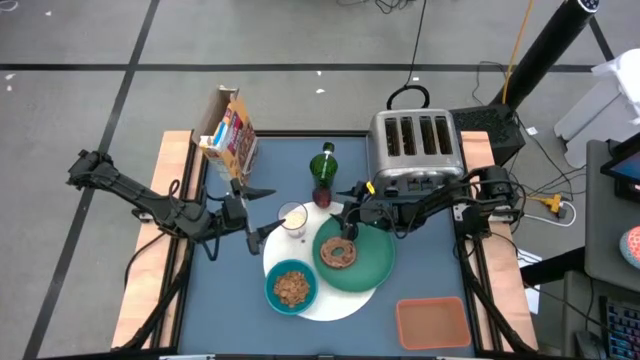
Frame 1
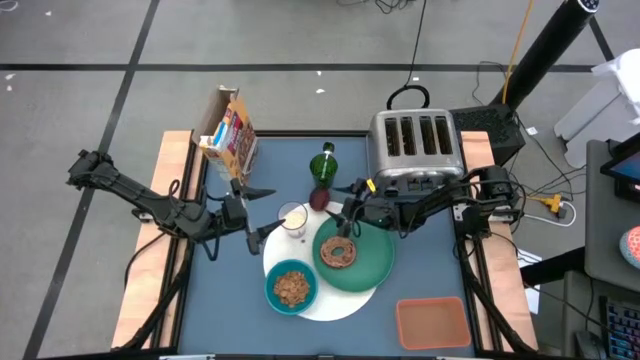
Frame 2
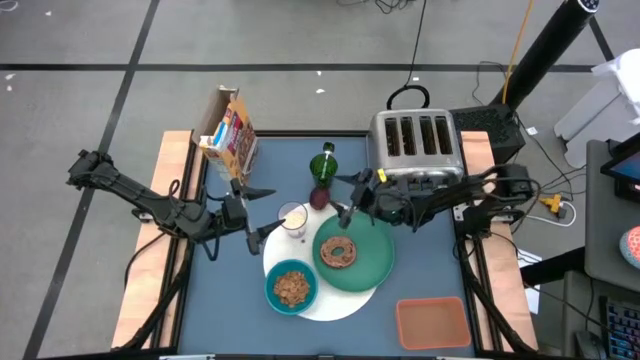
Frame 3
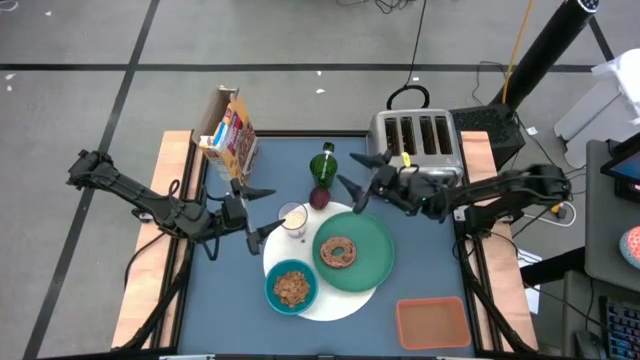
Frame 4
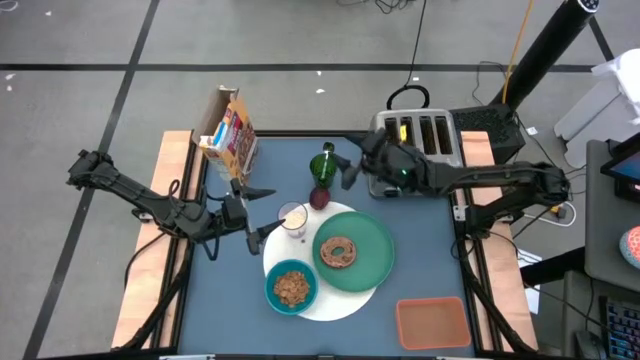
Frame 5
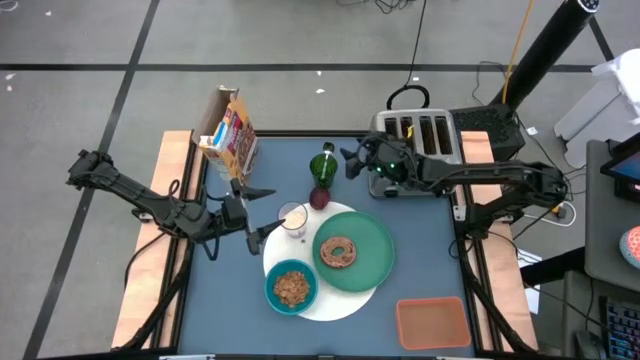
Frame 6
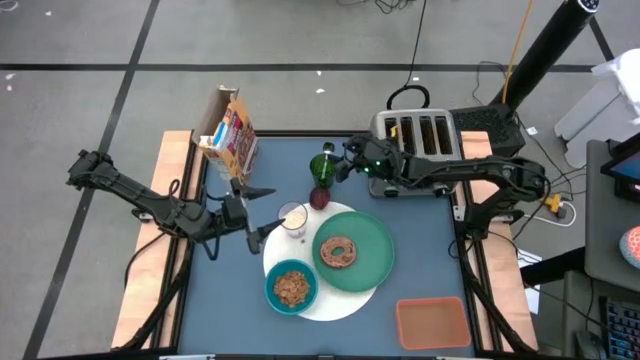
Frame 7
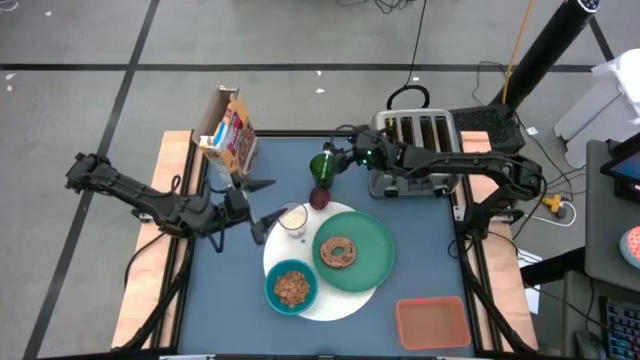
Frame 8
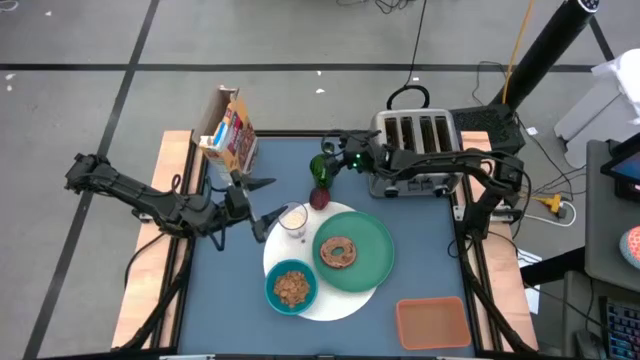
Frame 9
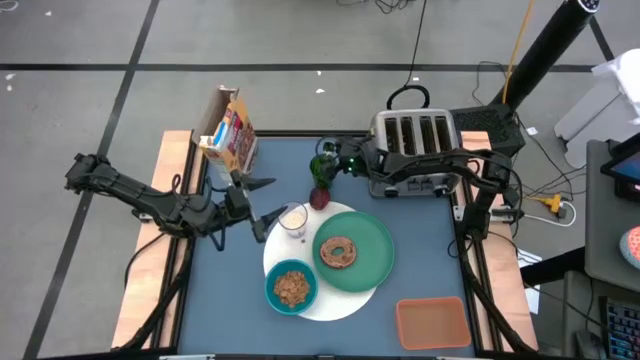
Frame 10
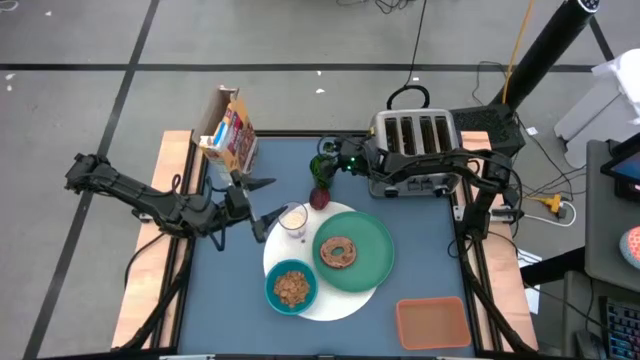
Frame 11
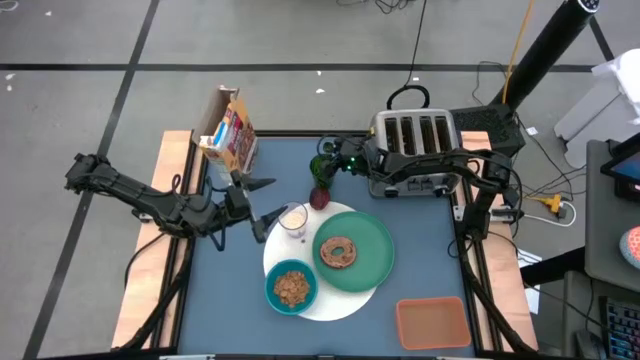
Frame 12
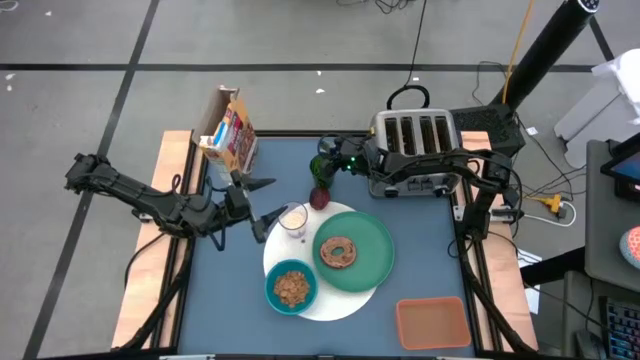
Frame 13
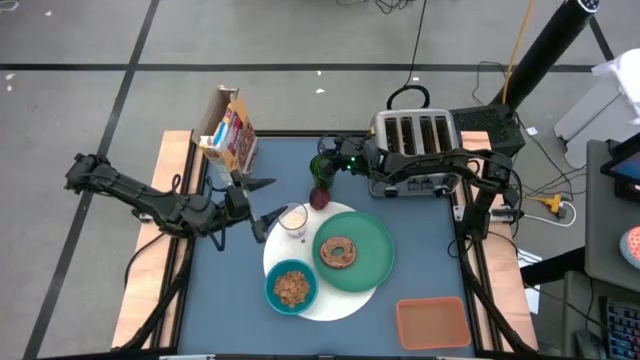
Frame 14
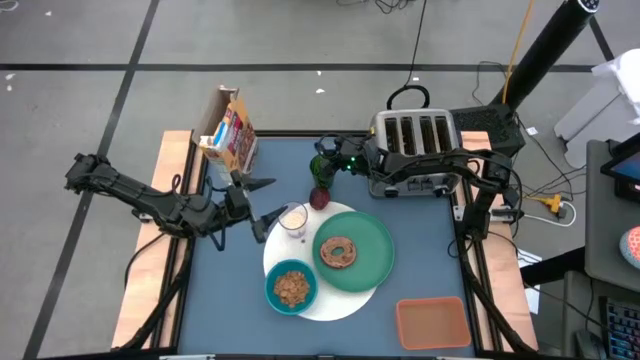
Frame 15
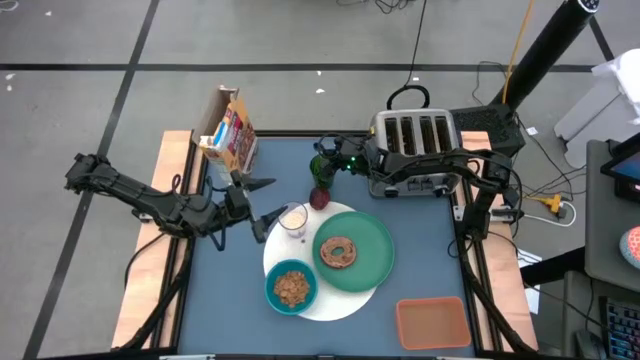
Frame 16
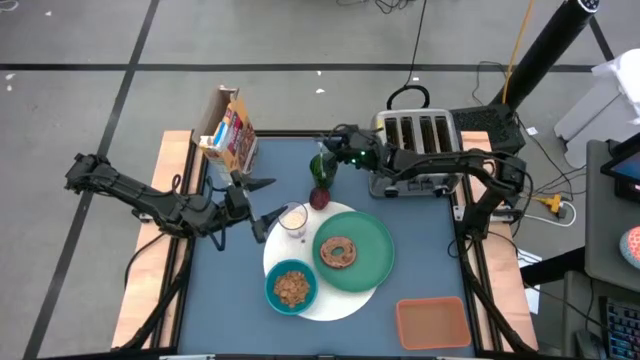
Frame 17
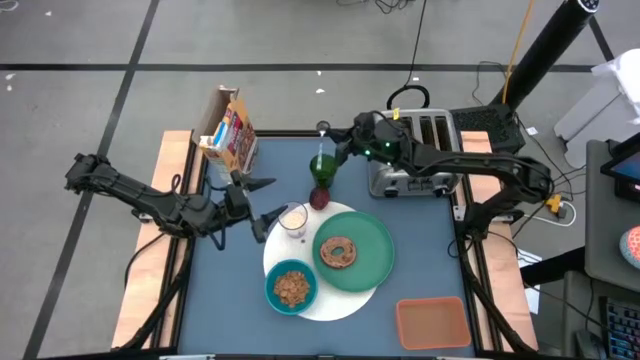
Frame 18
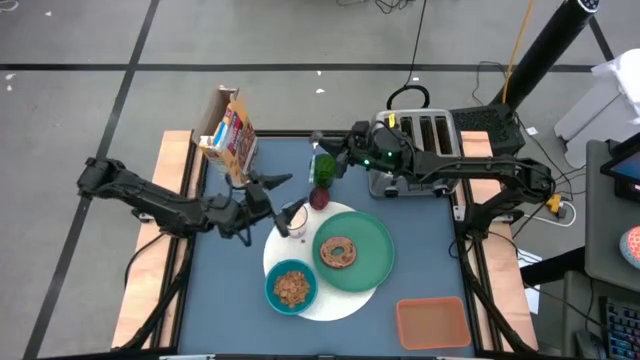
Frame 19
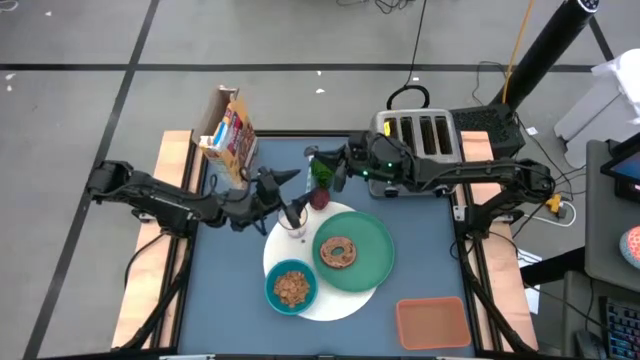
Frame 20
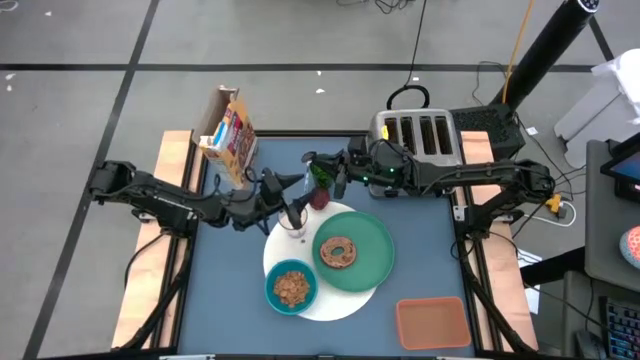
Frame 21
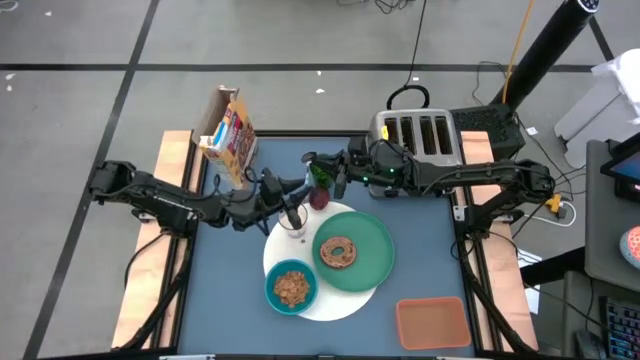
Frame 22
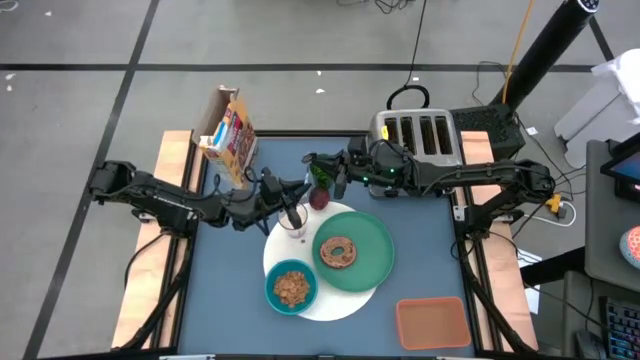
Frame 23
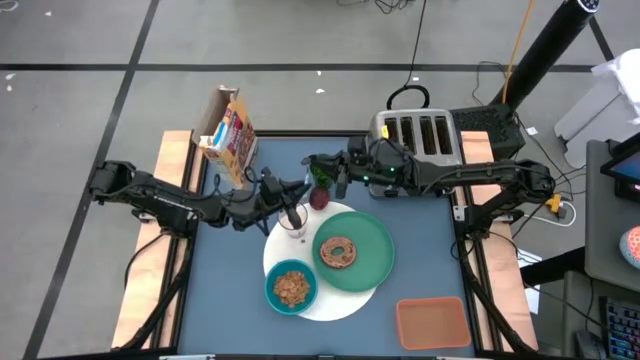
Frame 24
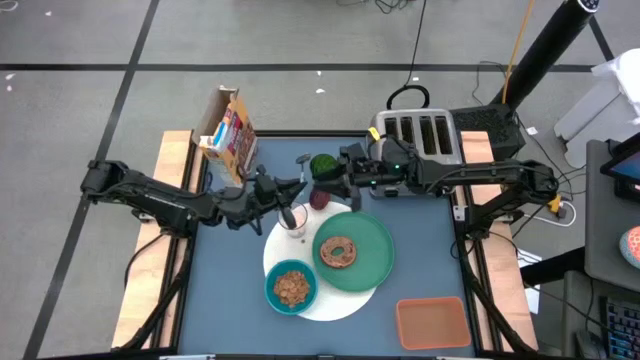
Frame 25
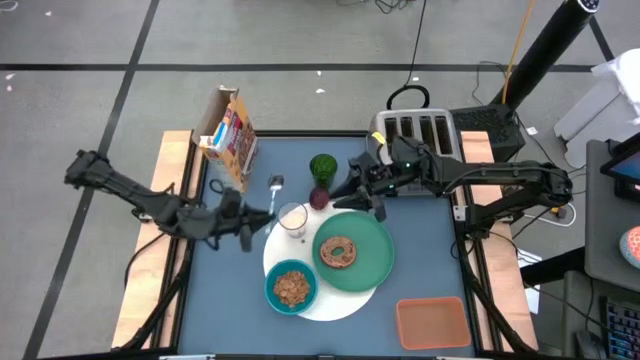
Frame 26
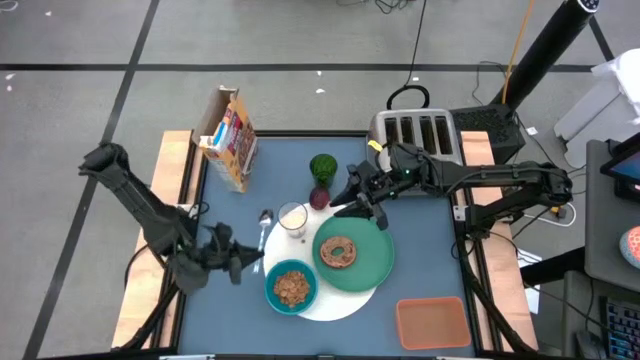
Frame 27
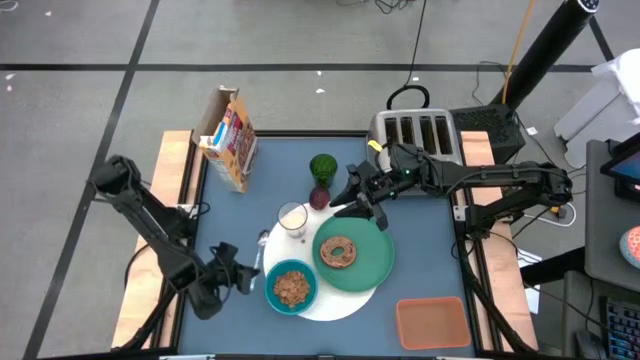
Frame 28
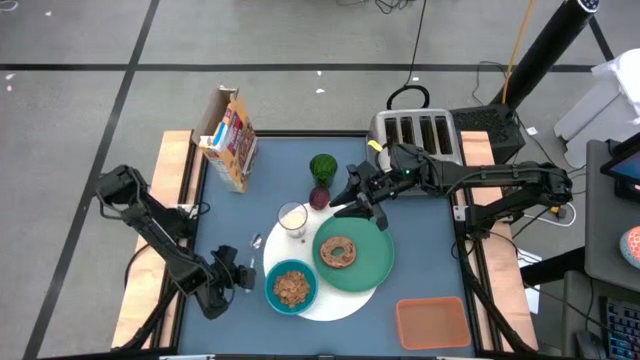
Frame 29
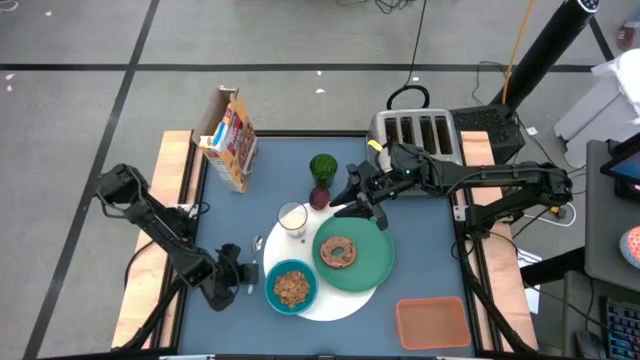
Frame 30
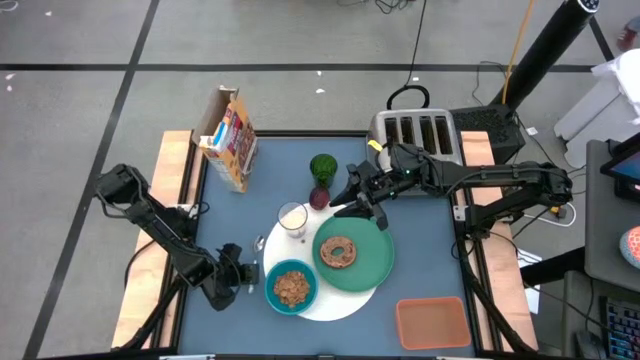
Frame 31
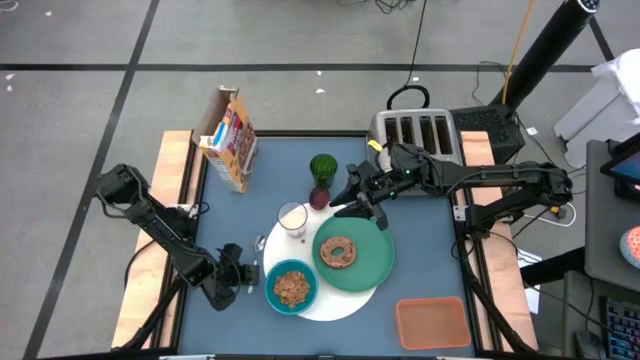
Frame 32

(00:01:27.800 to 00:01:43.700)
Task: Arrange a breakfast setting
Put the blue patterned spoon from the green cup on the table to the left of the white tablemat

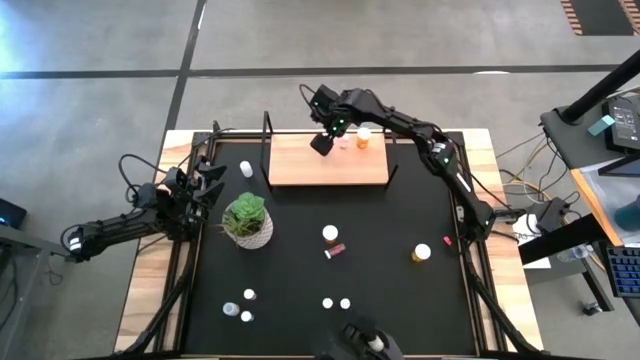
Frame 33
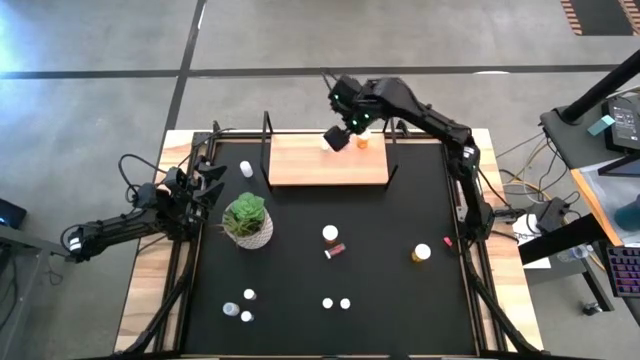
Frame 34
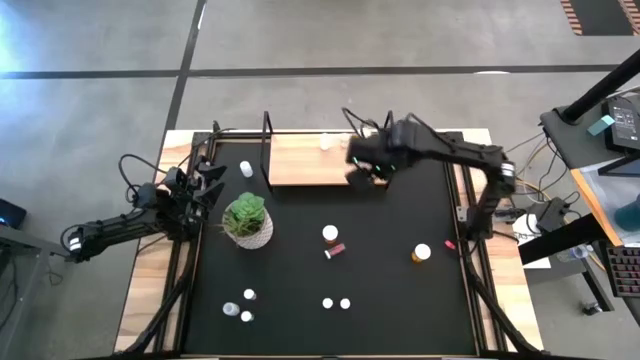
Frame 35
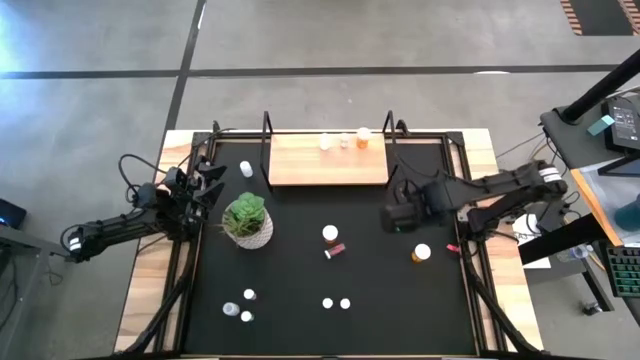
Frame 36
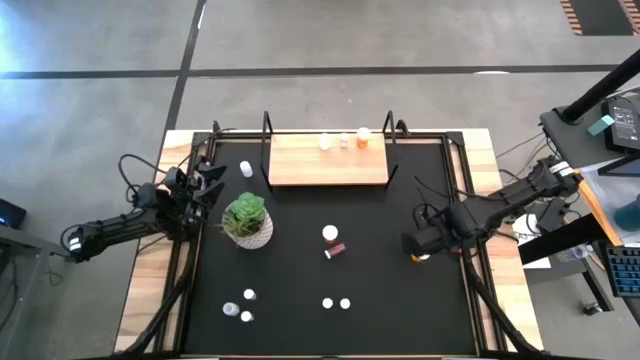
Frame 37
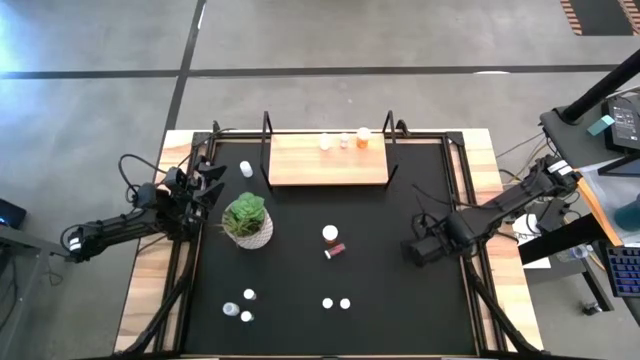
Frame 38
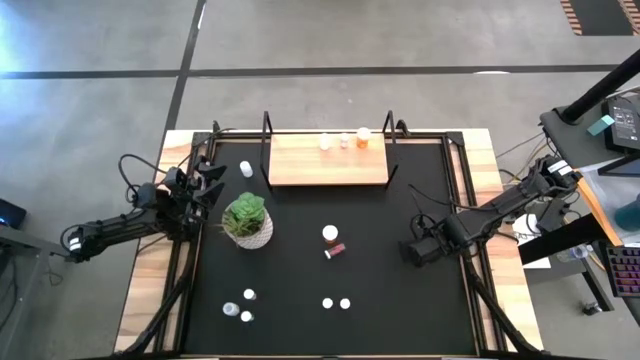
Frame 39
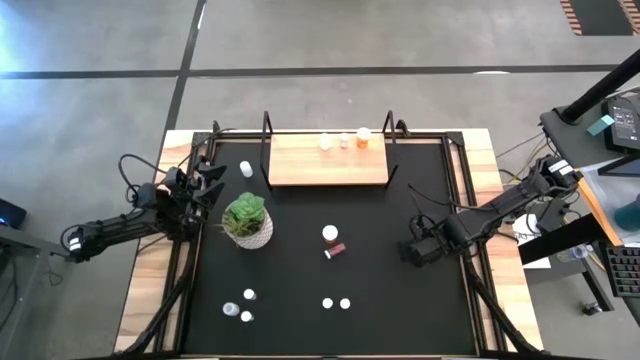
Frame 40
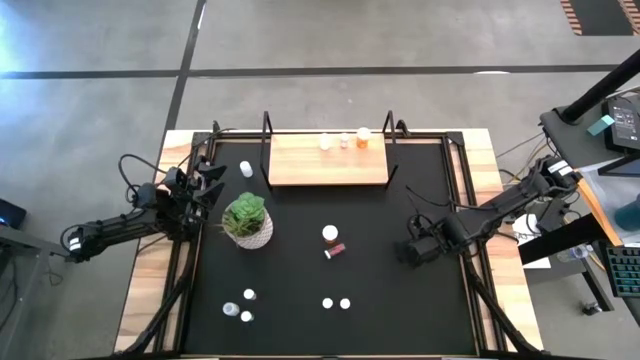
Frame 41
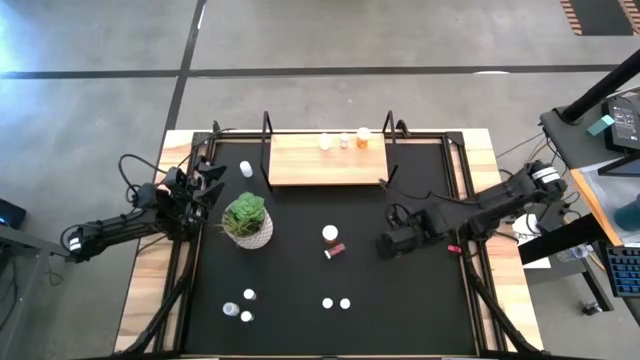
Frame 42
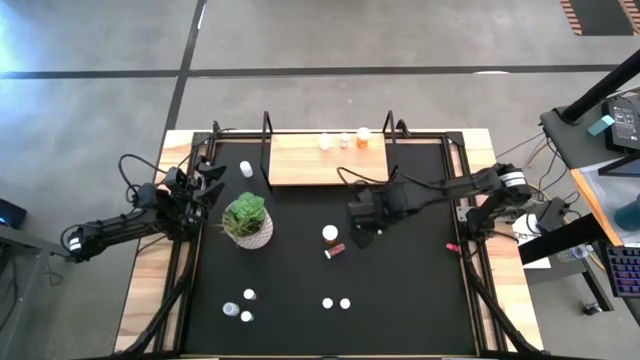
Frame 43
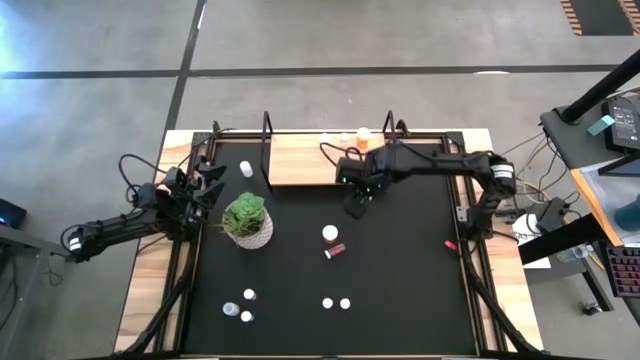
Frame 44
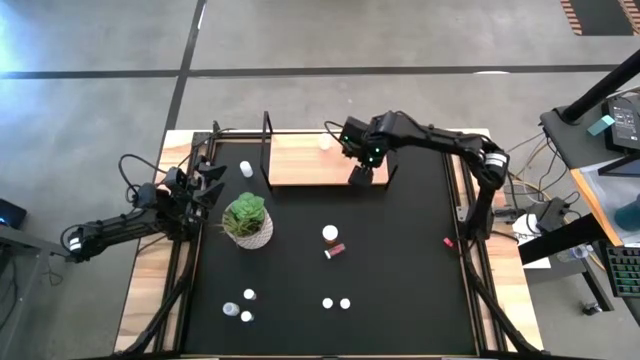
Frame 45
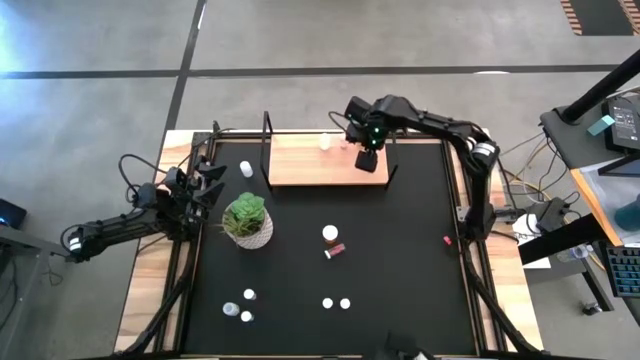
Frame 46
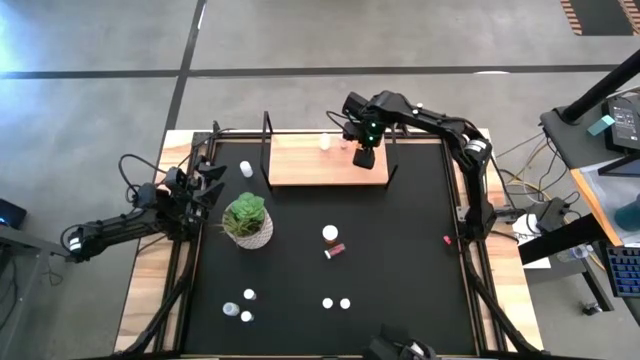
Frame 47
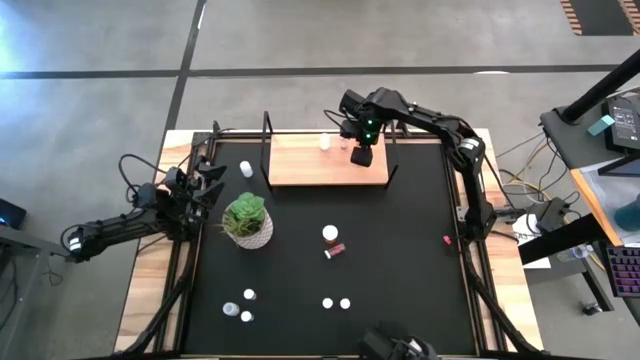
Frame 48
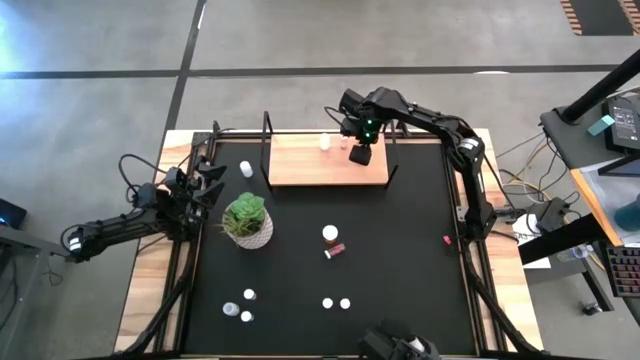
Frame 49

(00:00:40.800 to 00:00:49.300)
Task: Pick and place medicine bottles onto shelf by color
Put the right orange pill bottle on the shelf aligned with the other orange pill bottle
